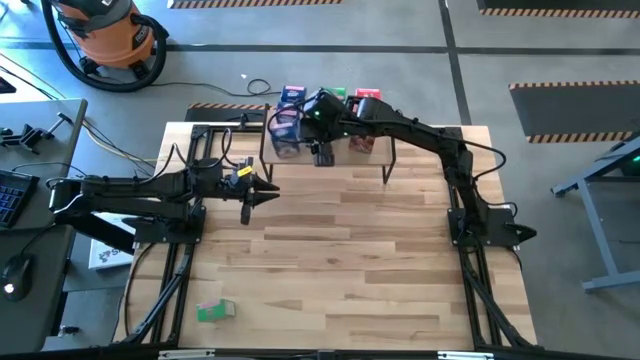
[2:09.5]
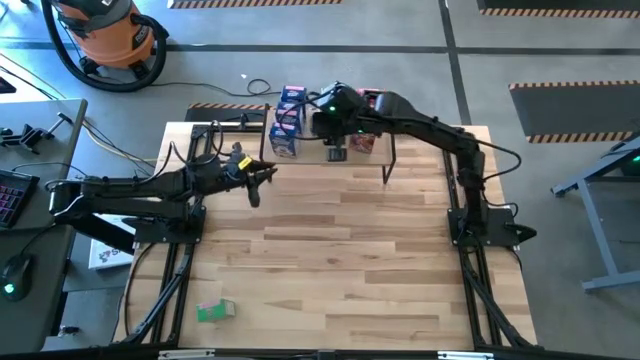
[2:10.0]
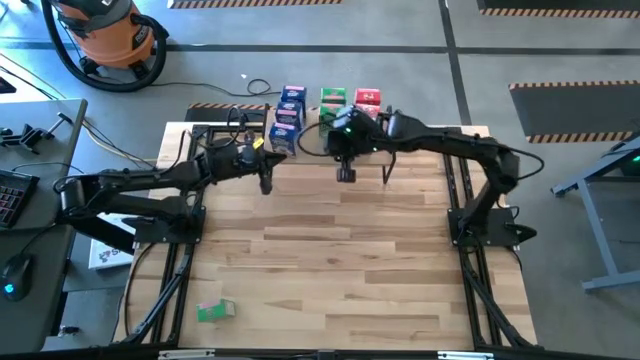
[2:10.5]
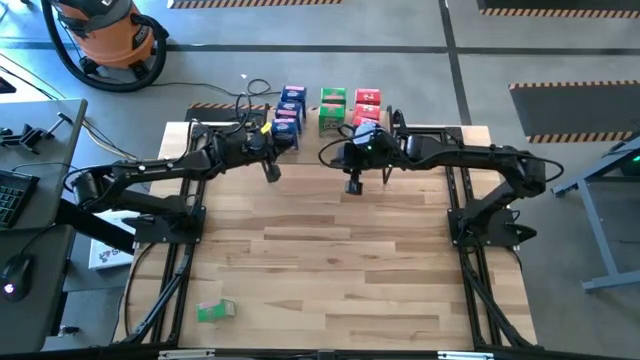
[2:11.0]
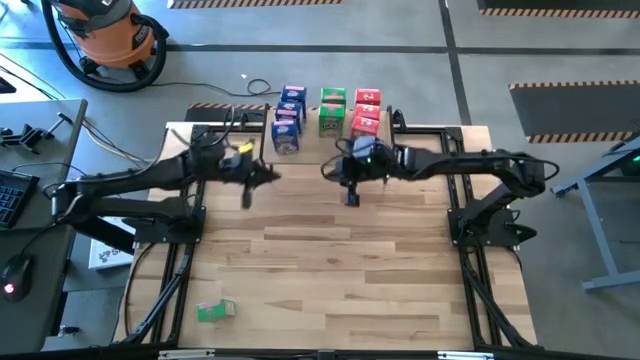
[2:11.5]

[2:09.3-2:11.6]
Task: Stack cereal on shelf
Adjust the blue cereal box on the table

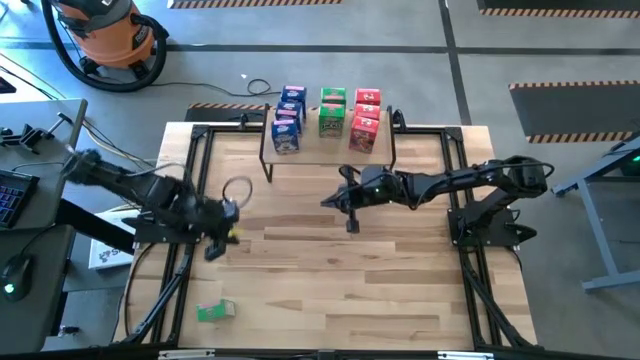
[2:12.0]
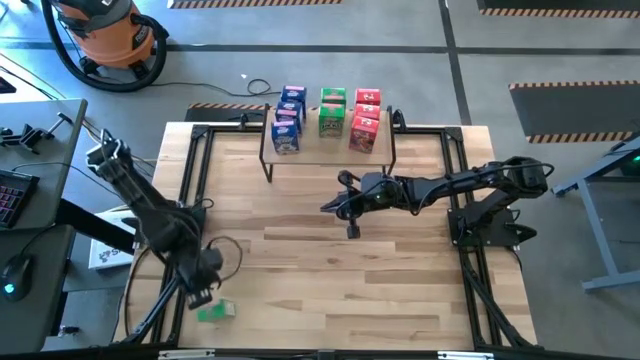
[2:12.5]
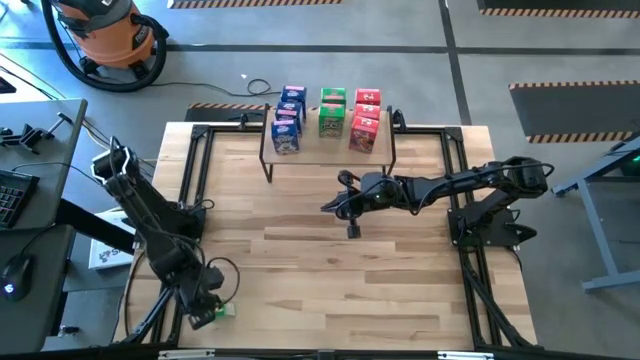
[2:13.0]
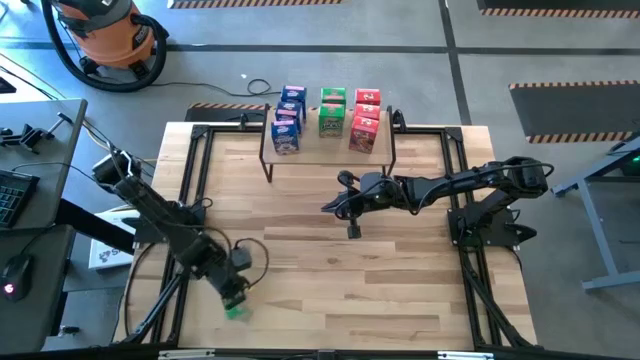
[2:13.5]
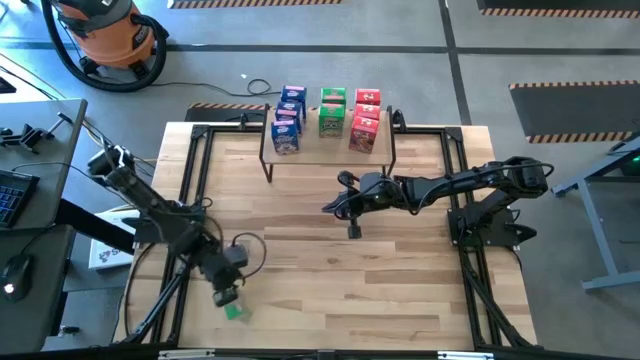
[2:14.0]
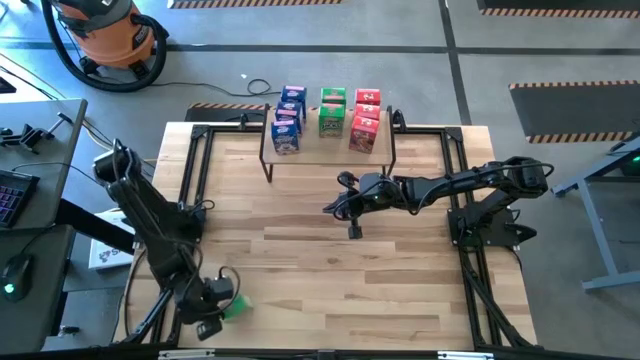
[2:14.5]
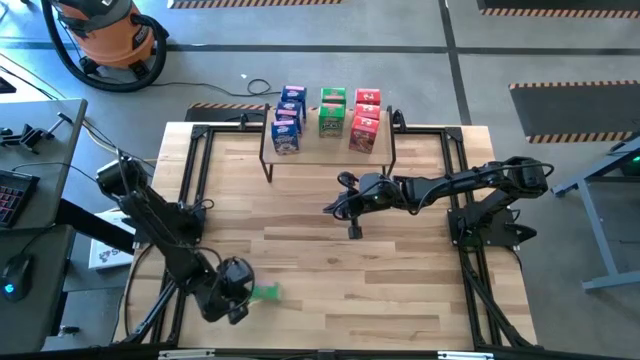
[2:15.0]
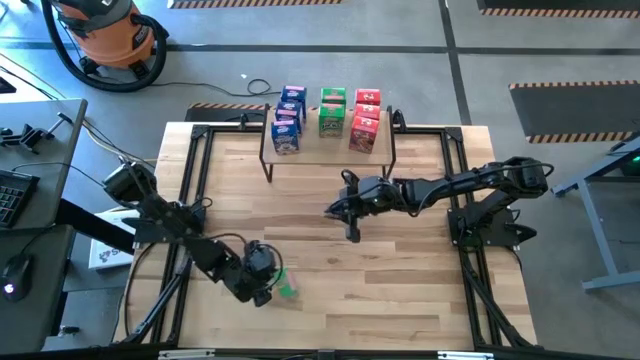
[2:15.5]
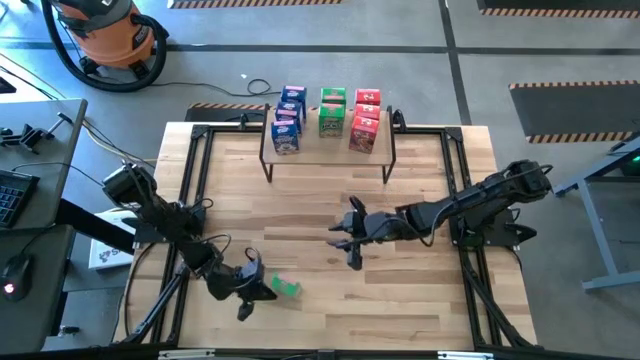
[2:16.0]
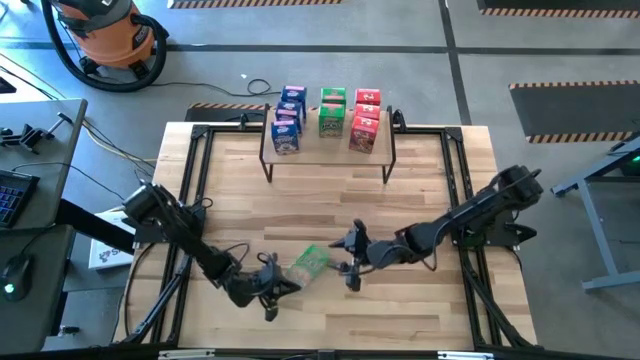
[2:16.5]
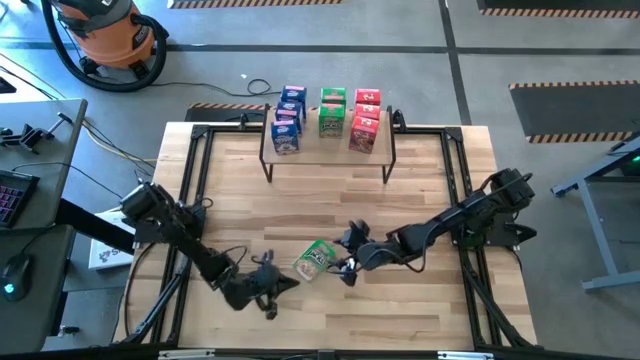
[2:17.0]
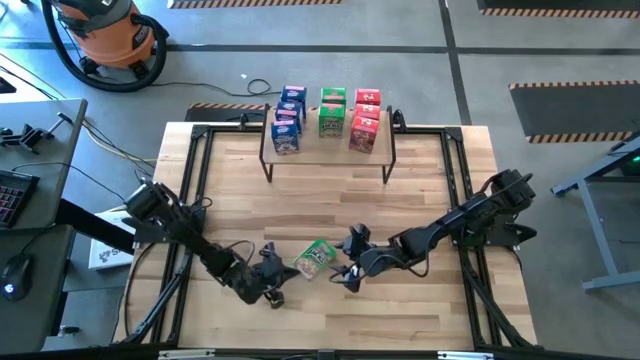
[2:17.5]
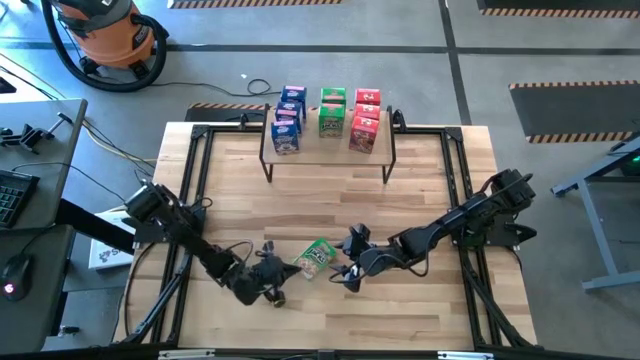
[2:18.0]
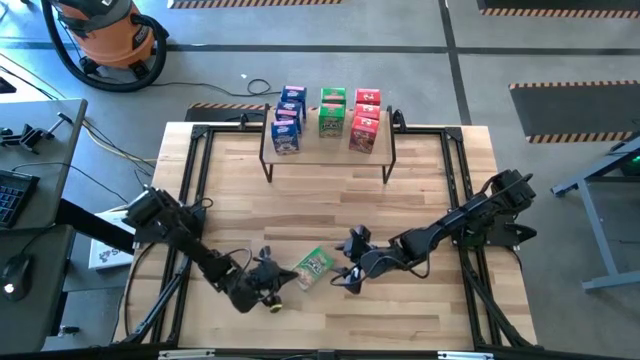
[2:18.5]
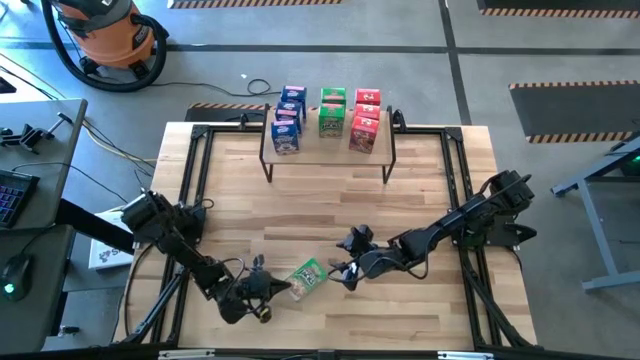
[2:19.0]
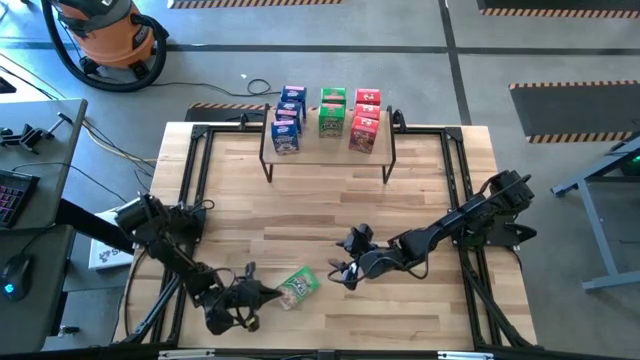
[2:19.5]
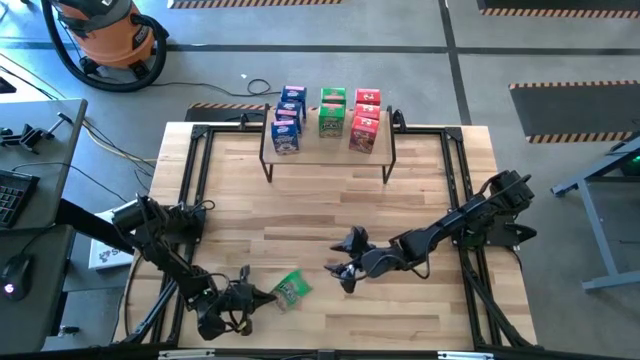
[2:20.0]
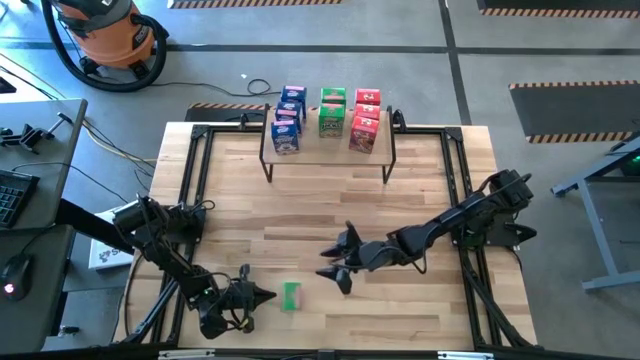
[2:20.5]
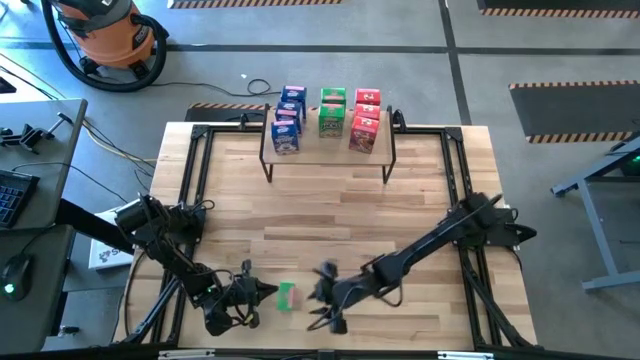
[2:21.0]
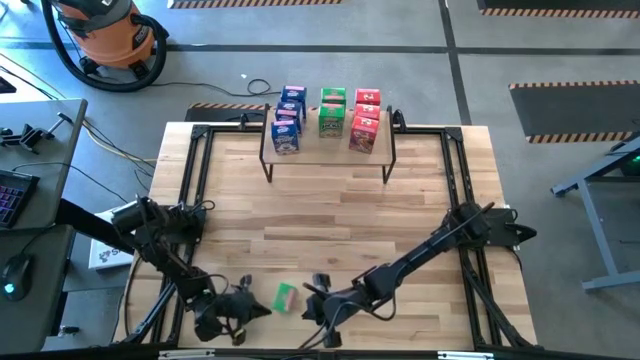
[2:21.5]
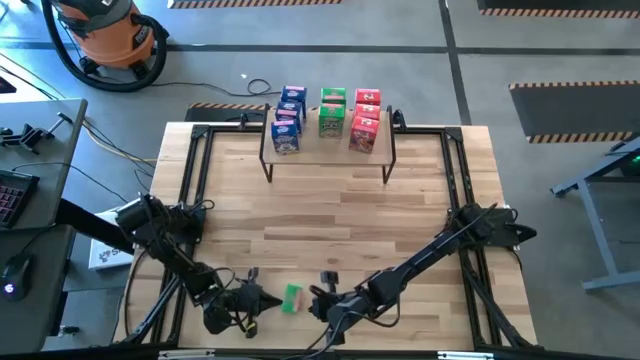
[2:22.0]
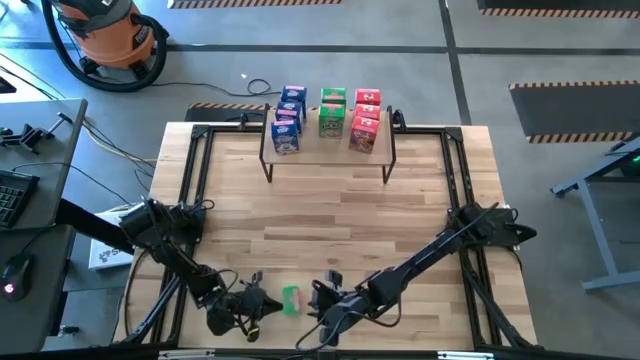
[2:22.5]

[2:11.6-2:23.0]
Move the green cereal into the center of the table

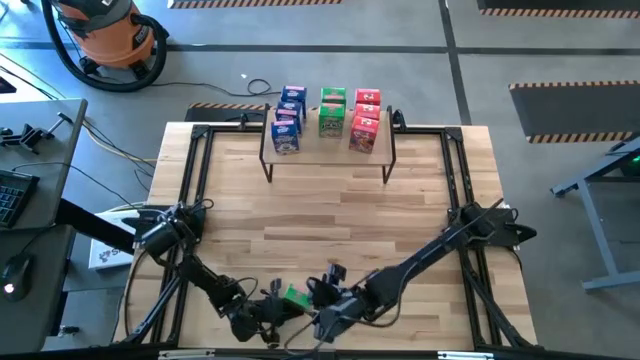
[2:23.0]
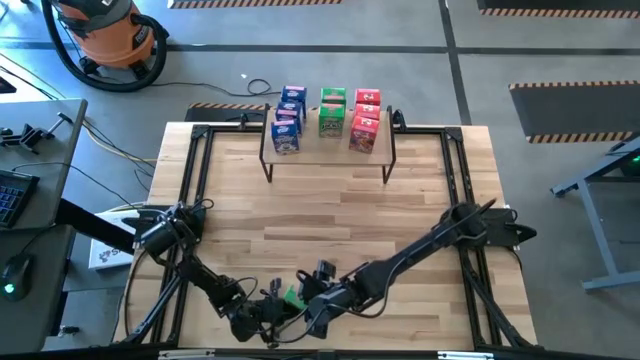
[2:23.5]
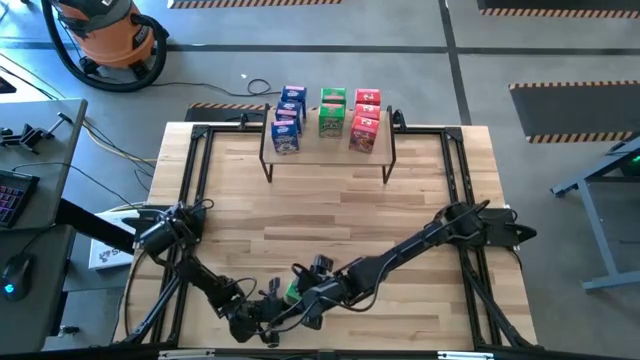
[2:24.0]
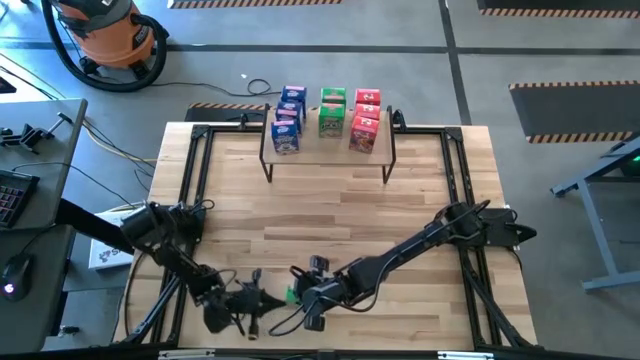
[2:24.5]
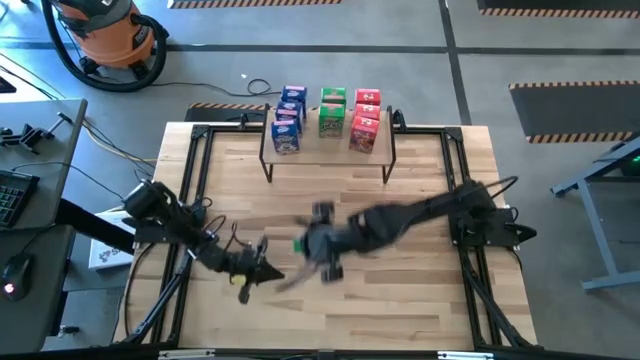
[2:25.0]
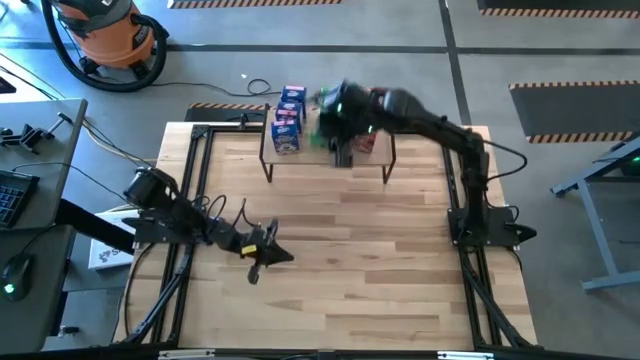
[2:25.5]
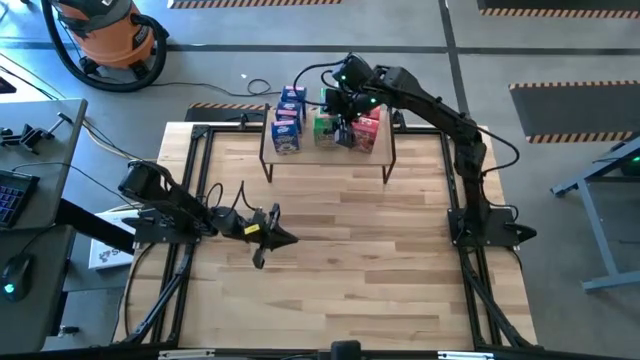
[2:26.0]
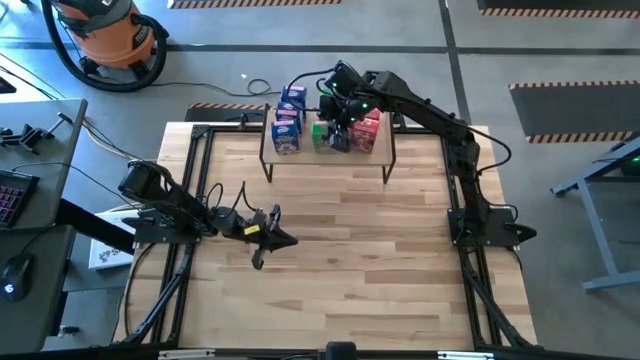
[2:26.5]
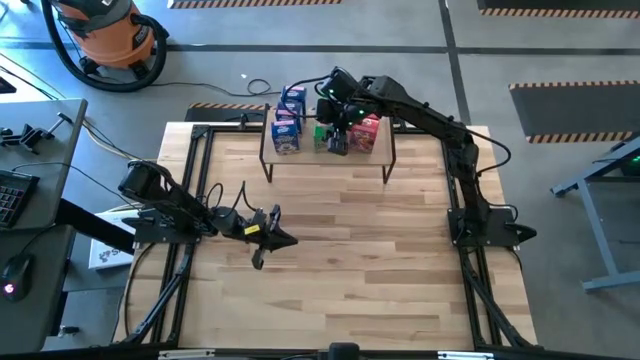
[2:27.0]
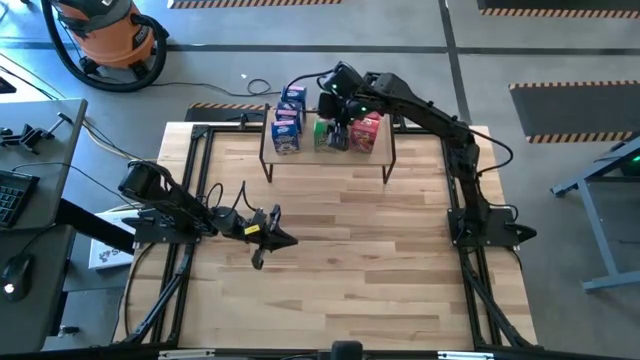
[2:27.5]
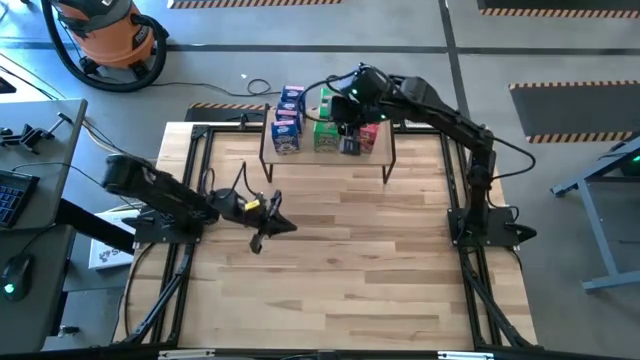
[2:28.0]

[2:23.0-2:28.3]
Put the green cereal on the shelf aligned with the other green cereal box

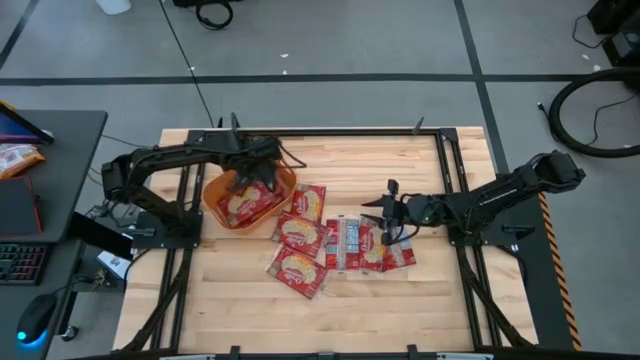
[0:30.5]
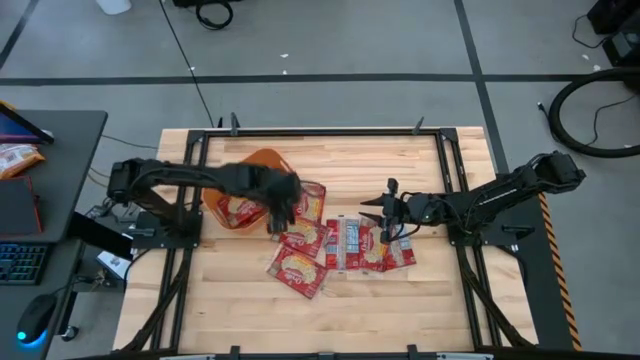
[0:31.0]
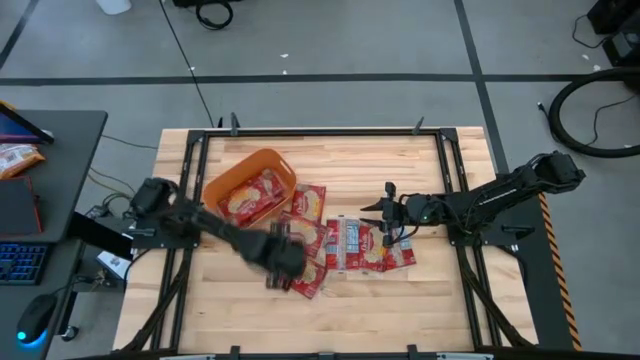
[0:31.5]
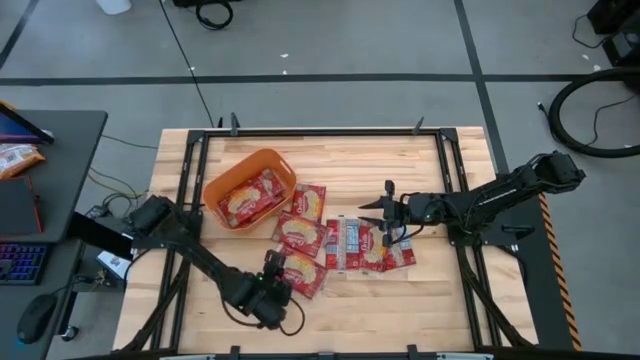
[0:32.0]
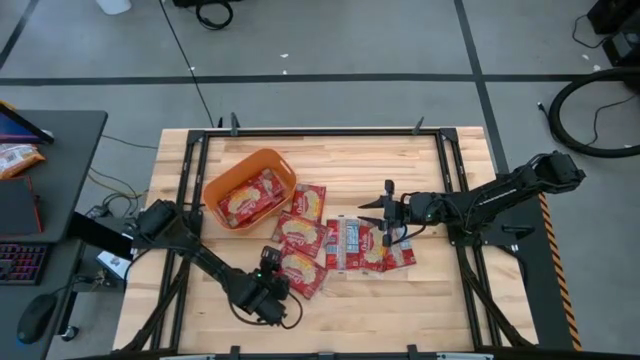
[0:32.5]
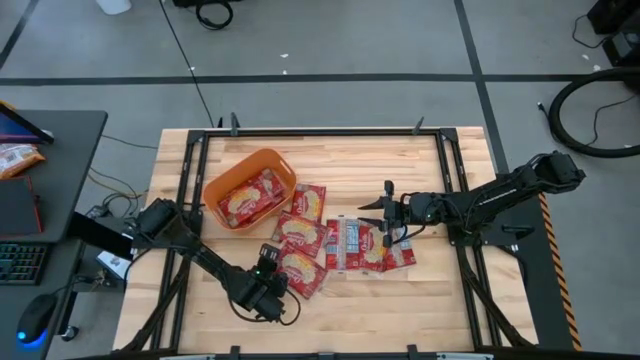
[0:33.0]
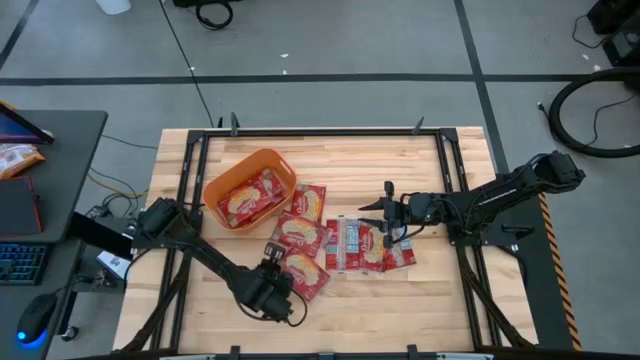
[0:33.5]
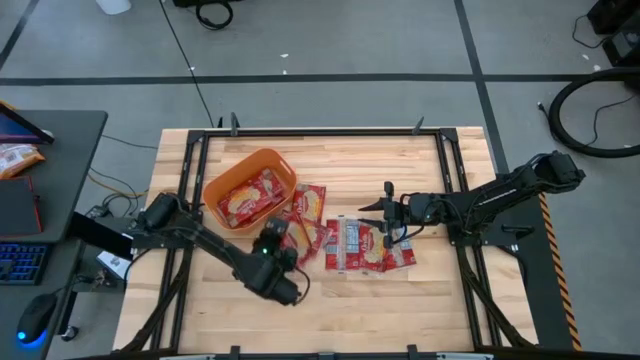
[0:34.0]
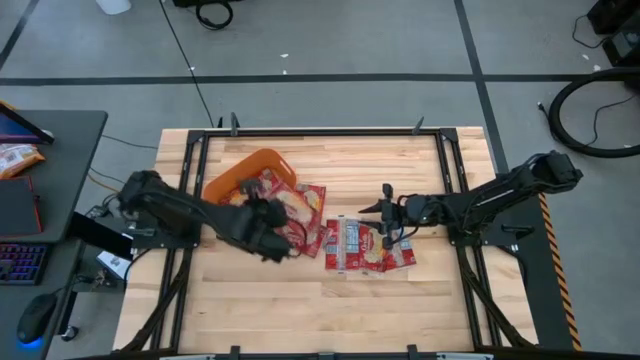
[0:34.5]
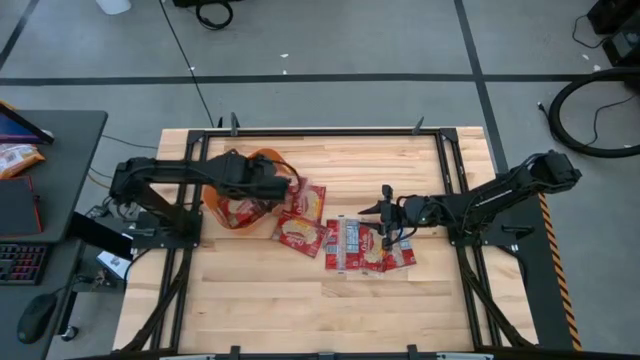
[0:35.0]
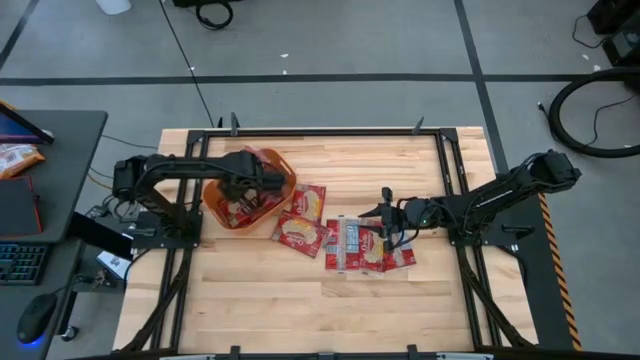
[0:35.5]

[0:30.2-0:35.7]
Task: Sort popcorn bags into baskets
Put the red popcorn bag into the orange bin
